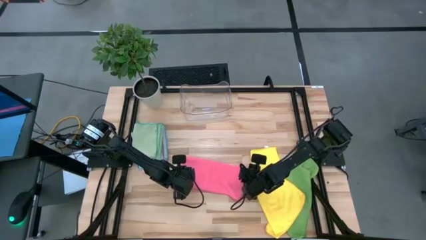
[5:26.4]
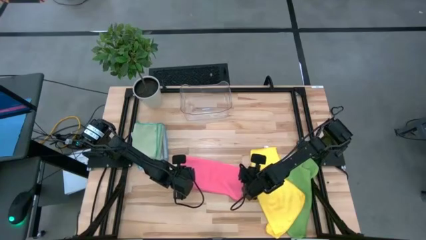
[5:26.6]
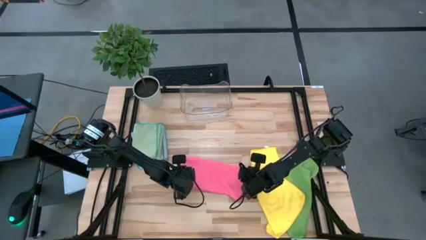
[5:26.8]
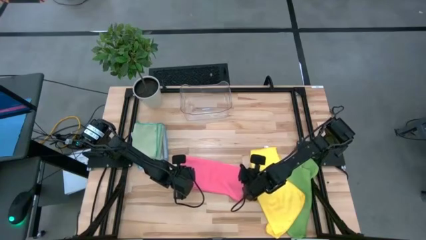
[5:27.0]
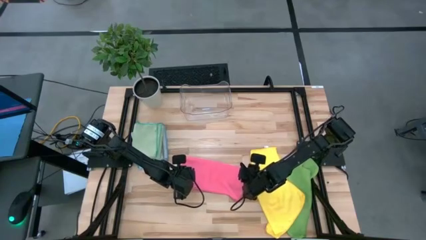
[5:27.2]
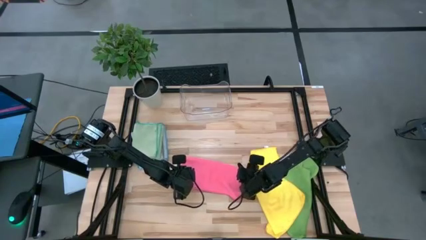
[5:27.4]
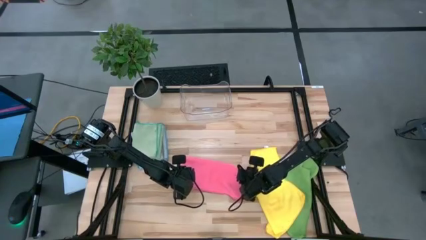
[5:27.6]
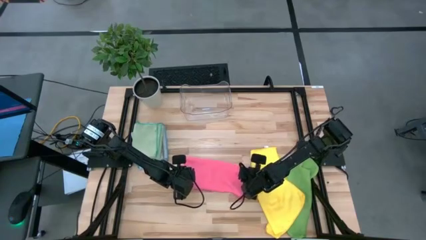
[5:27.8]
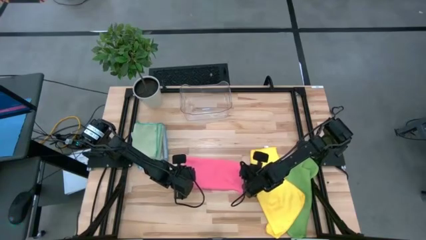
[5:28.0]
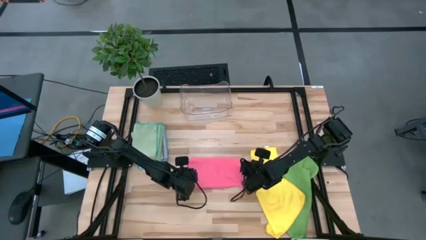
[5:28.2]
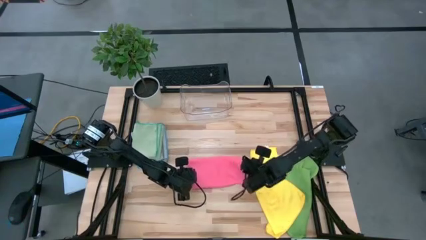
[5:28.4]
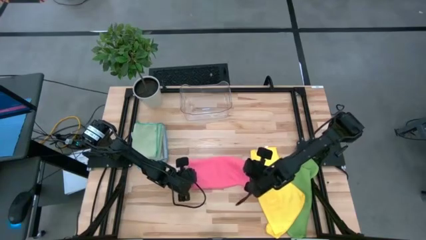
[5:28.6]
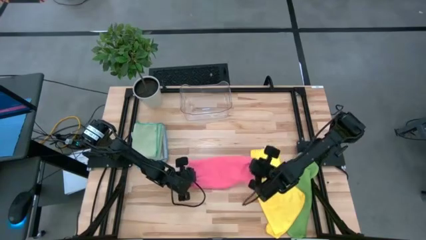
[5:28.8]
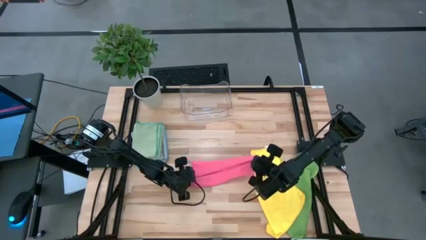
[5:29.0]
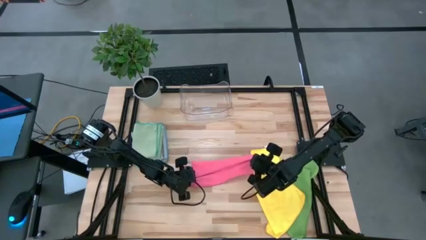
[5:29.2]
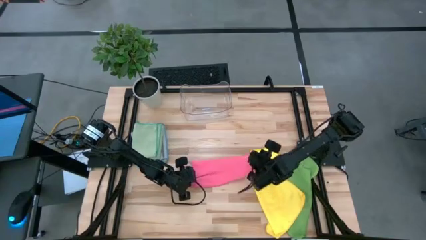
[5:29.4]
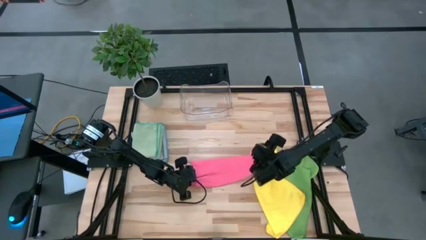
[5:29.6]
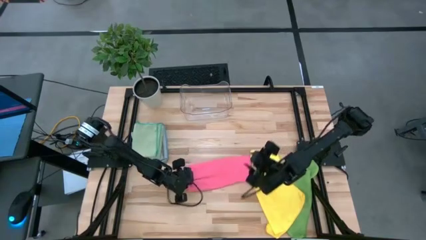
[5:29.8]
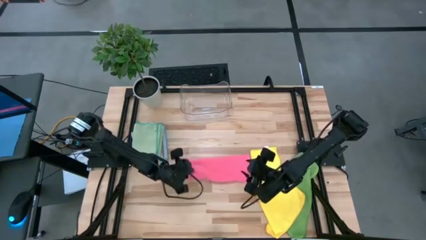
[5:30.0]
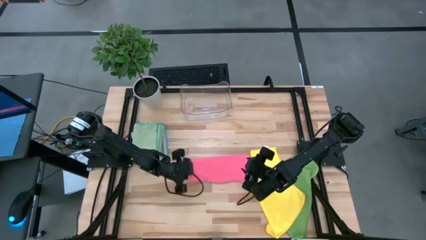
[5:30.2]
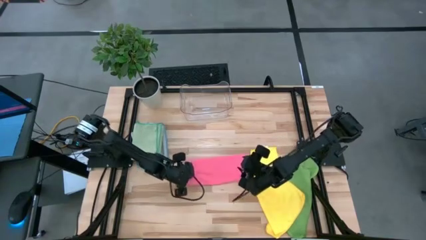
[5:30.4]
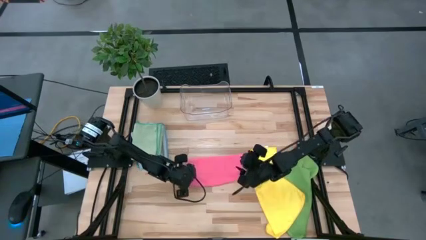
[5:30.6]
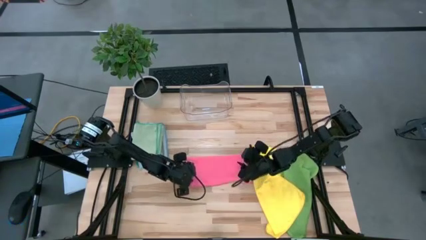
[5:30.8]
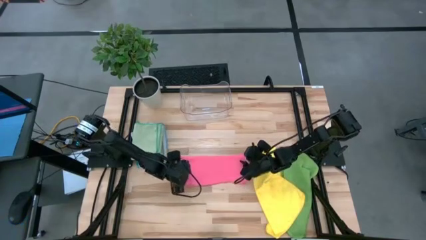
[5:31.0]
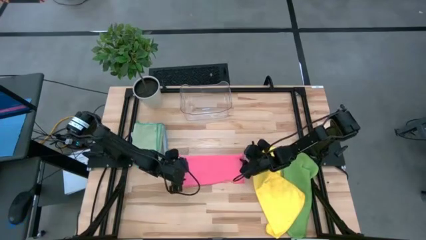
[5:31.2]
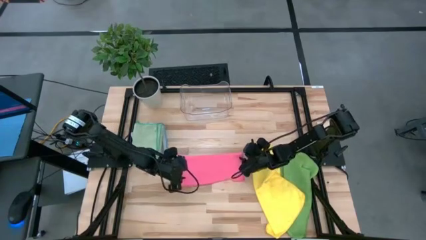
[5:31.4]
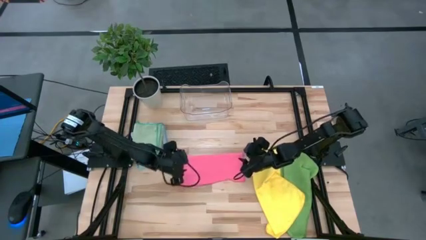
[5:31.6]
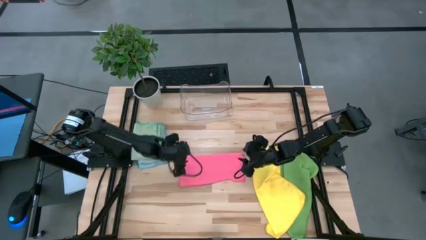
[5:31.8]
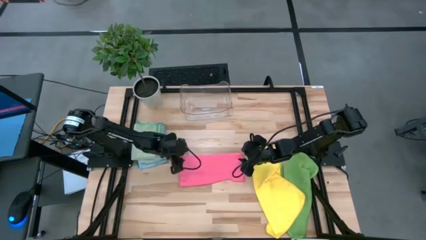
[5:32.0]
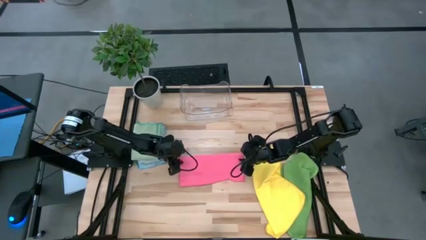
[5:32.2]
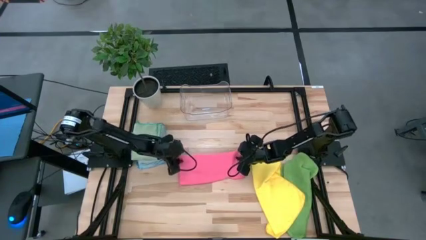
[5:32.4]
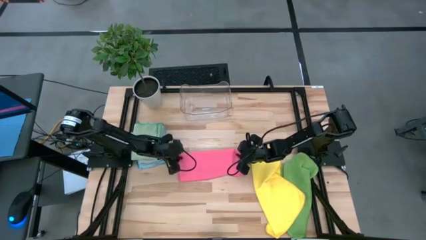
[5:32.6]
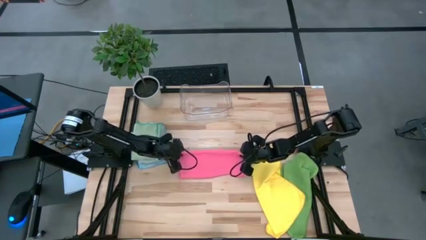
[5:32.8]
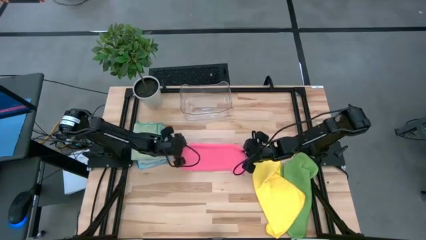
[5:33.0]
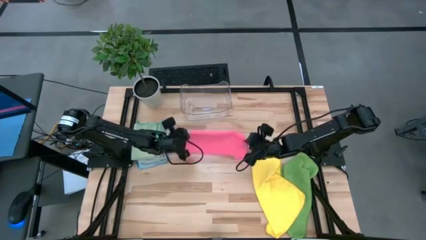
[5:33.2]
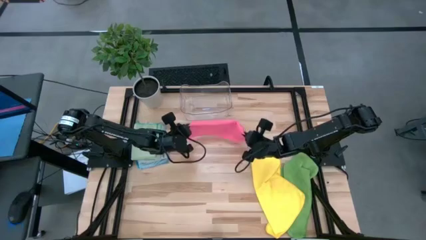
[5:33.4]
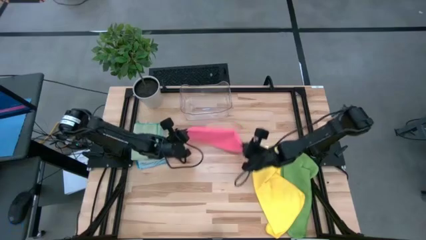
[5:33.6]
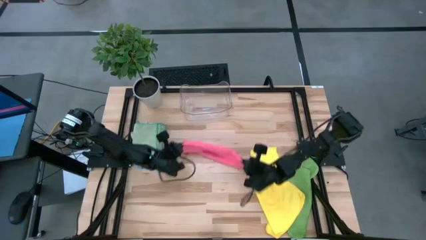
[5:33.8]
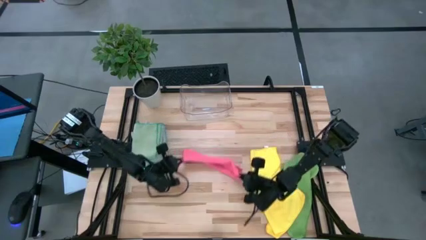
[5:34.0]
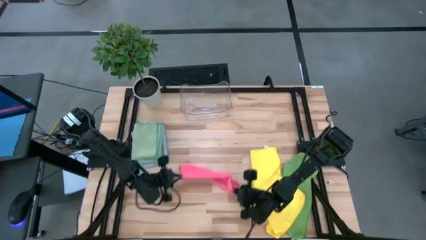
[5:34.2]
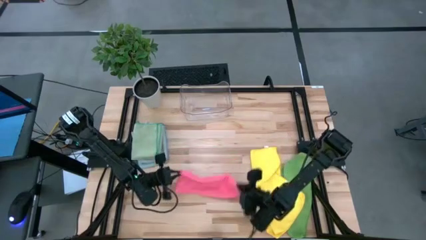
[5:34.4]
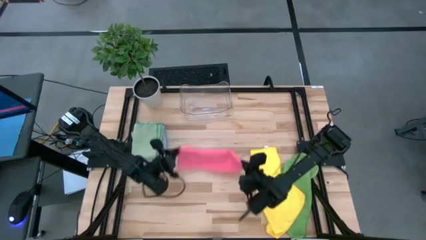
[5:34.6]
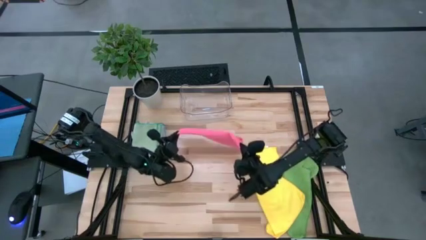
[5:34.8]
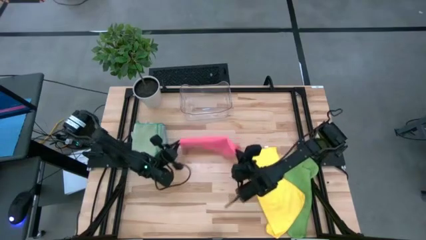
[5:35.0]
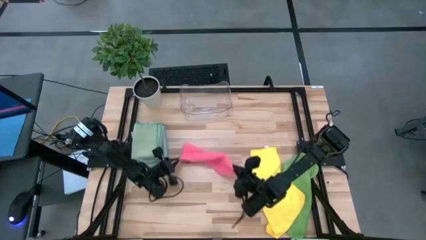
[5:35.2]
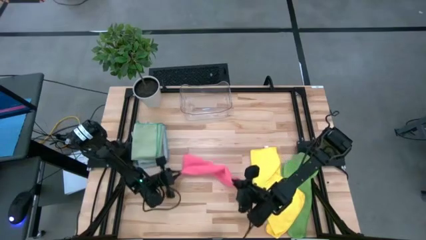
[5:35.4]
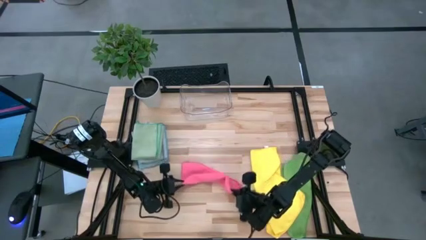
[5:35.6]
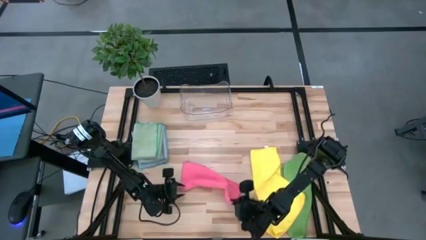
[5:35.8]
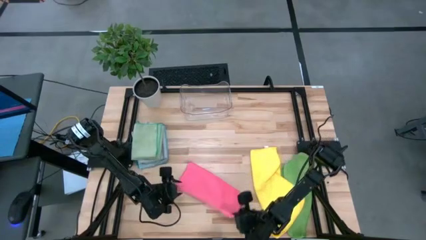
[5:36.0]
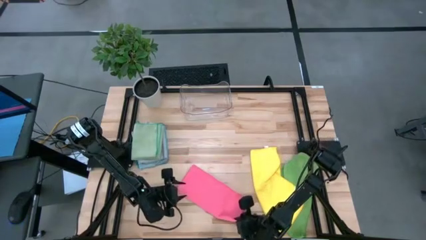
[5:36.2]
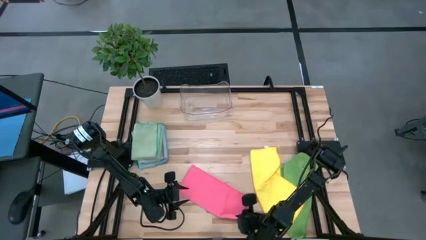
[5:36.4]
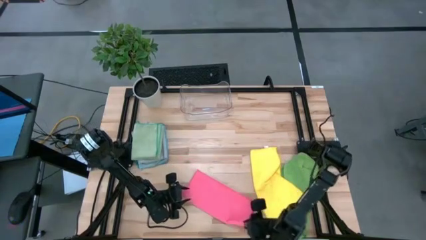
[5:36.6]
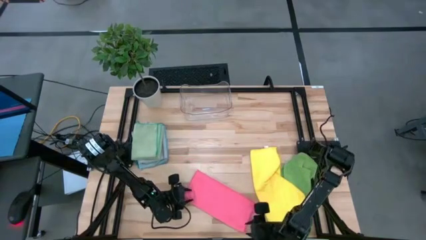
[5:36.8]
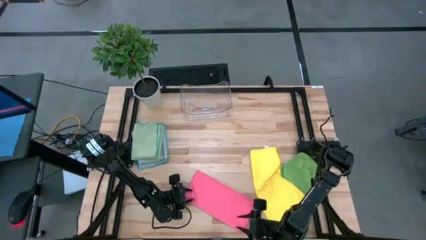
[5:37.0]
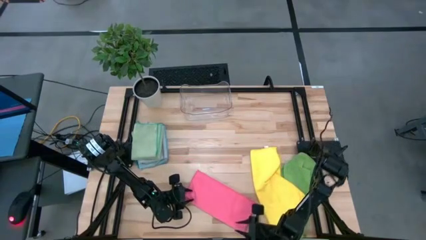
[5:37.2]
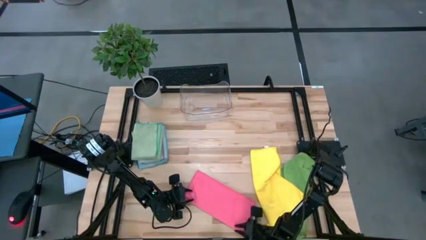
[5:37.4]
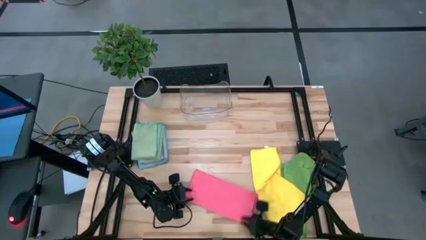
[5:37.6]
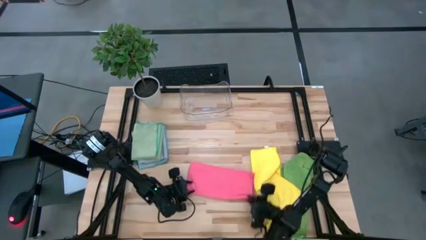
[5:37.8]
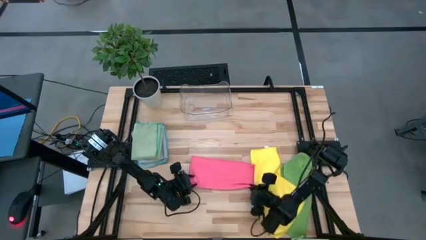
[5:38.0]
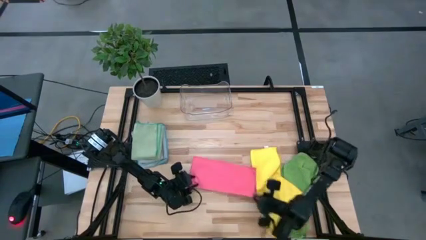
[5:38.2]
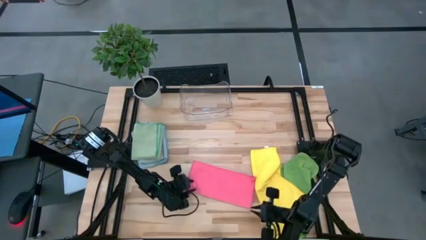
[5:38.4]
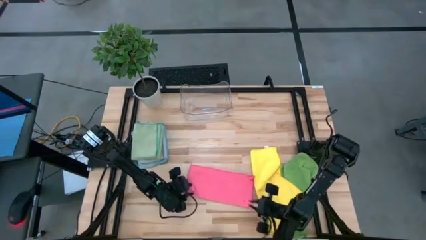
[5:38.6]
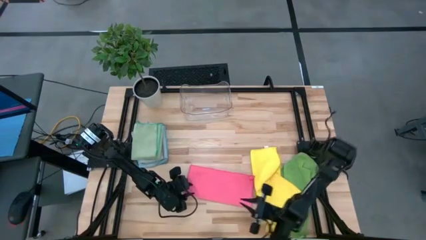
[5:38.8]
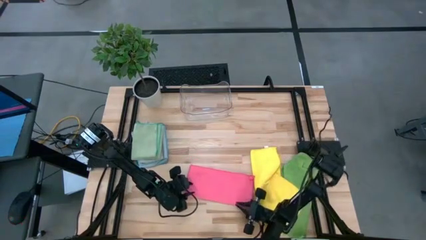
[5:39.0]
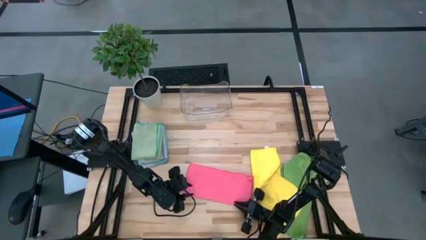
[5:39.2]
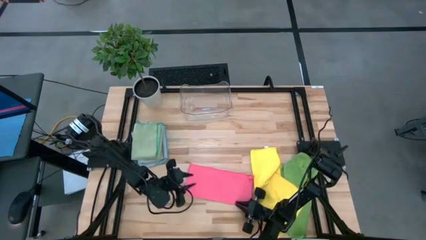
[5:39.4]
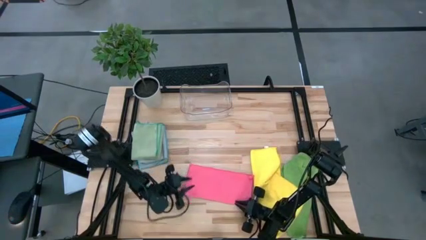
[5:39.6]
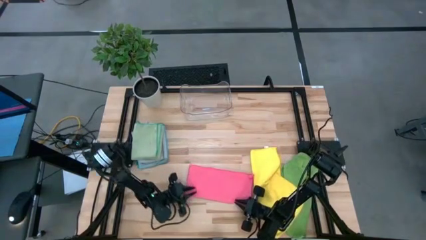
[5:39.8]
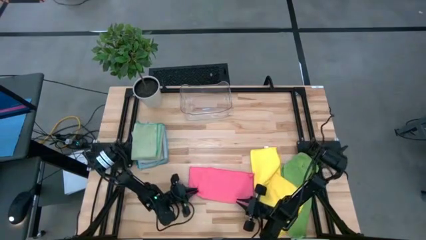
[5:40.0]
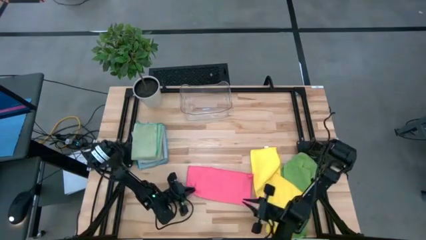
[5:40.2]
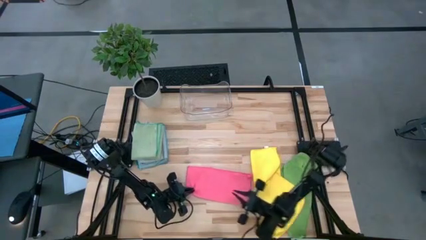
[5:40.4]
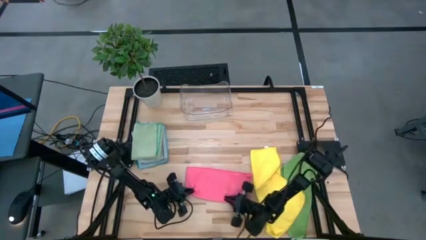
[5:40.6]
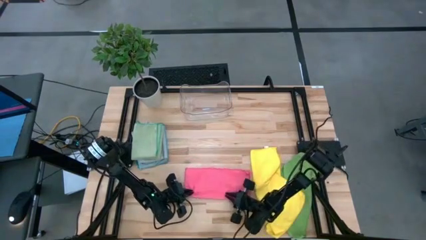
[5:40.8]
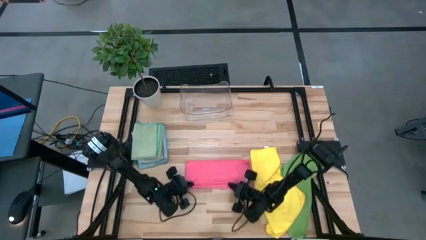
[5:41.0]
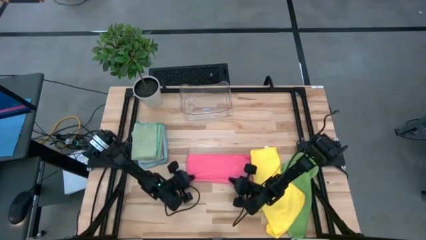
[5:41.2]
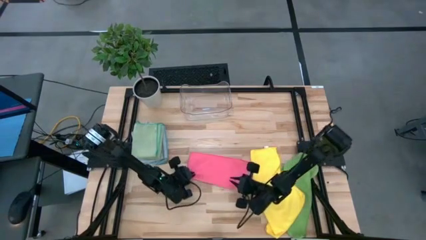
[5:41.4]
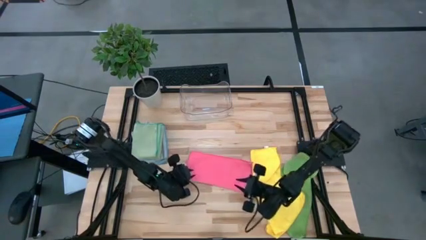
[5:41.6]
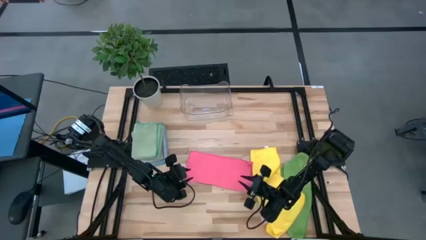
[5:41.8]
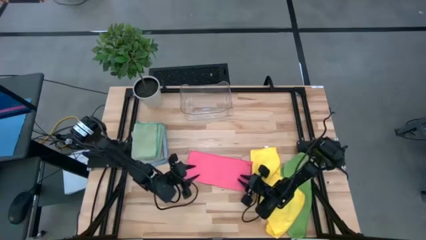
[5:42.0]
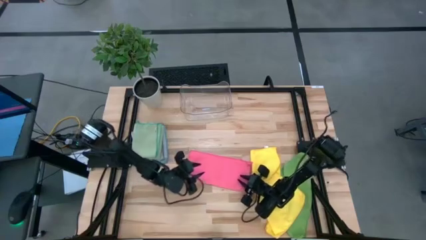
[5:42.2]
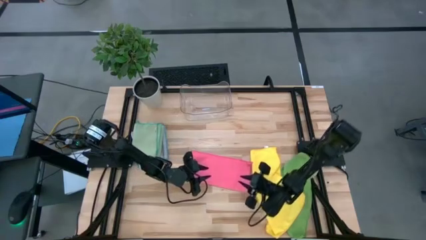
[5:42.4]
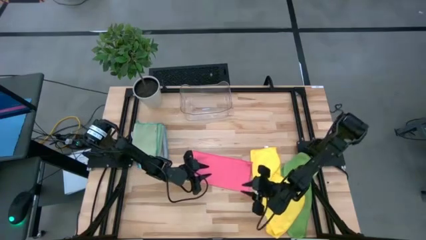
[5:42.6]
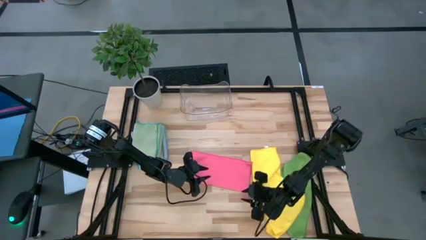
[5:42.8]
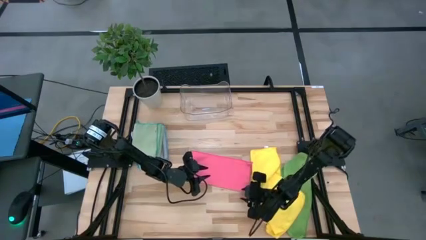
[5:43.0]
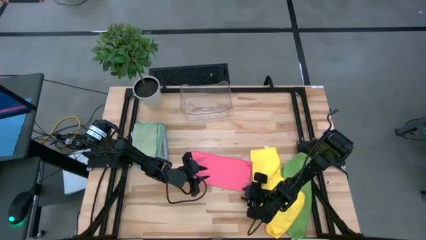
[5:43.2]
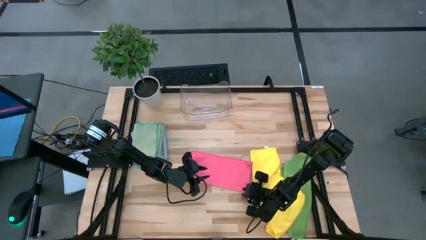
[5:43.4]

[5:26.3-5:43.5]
Task: Fold microfiber towels
Fold the pink microfiber cloth
